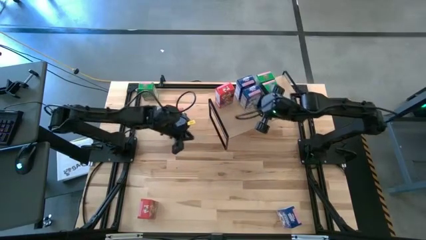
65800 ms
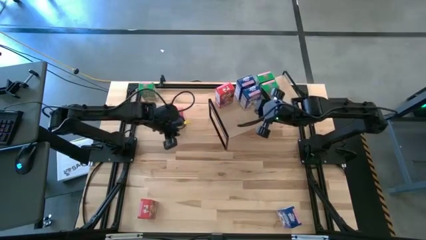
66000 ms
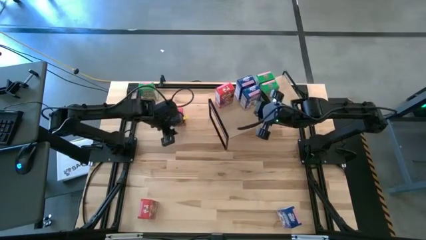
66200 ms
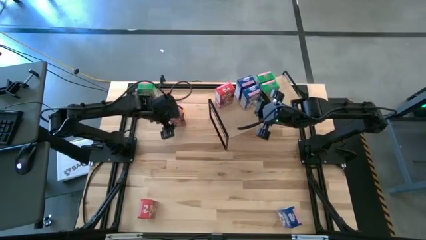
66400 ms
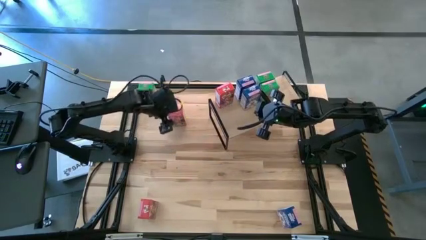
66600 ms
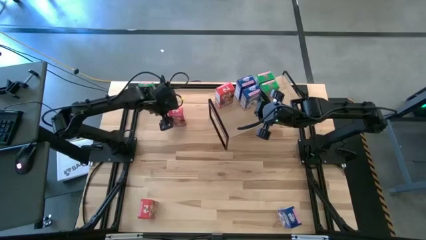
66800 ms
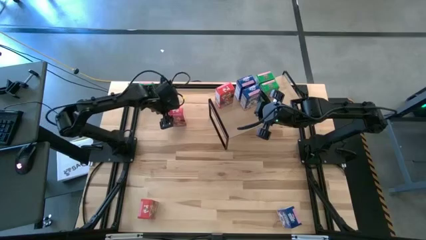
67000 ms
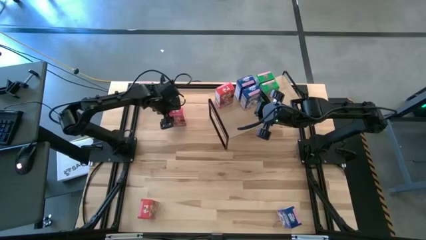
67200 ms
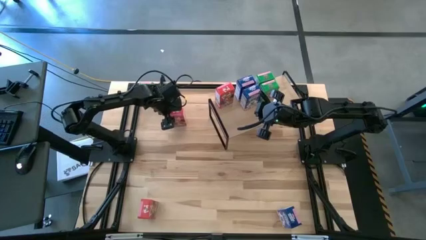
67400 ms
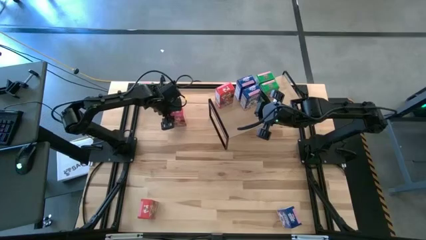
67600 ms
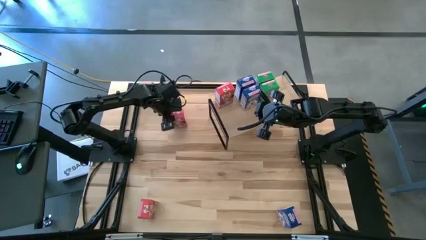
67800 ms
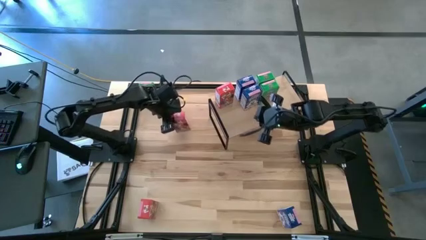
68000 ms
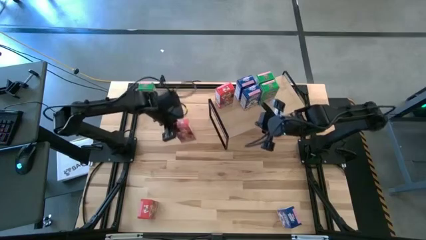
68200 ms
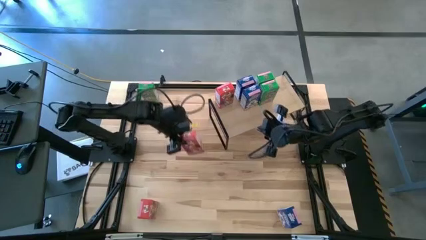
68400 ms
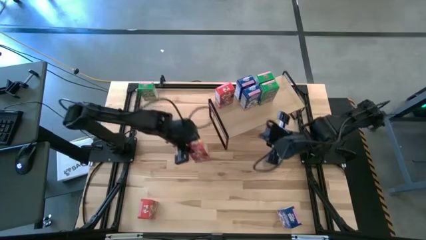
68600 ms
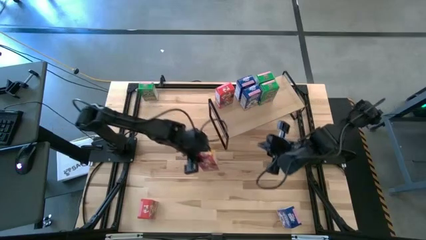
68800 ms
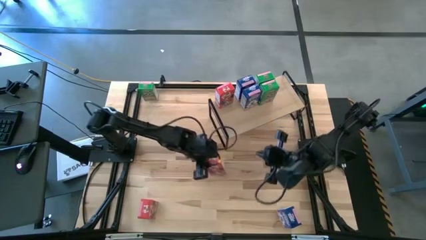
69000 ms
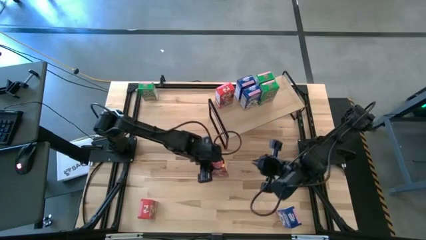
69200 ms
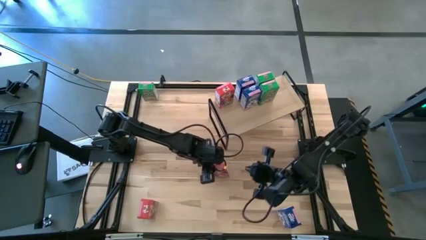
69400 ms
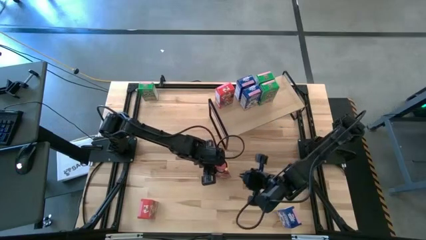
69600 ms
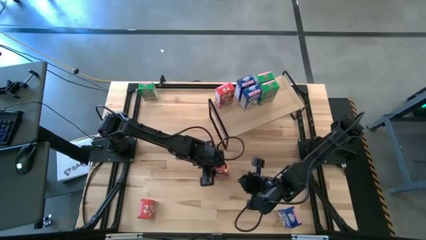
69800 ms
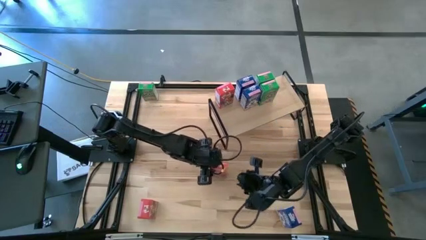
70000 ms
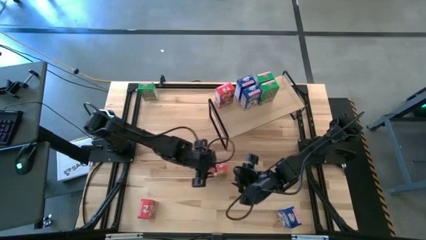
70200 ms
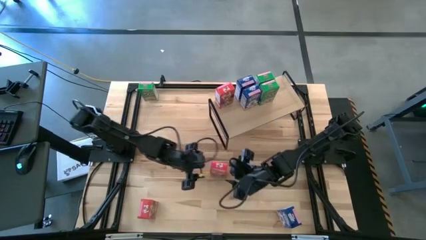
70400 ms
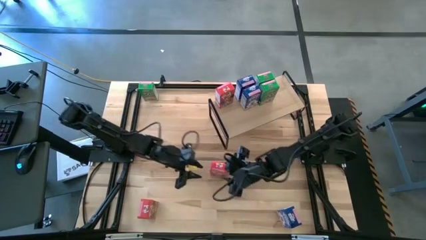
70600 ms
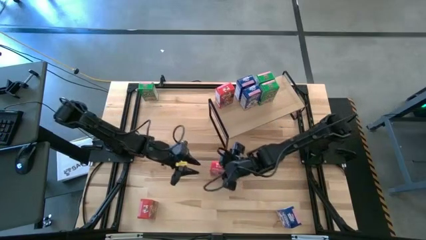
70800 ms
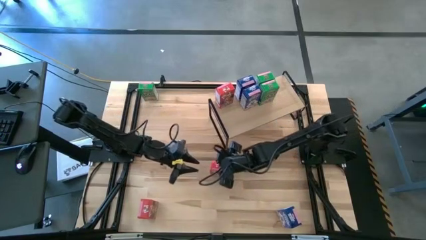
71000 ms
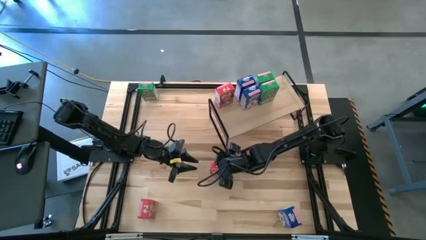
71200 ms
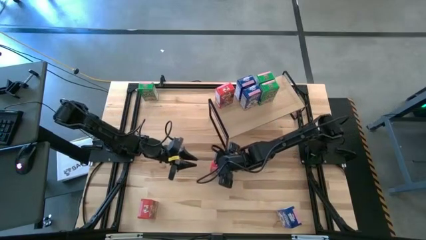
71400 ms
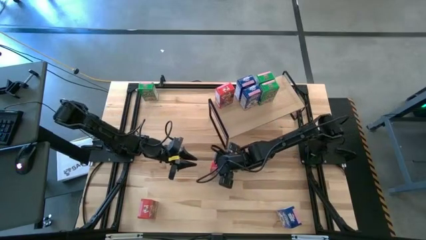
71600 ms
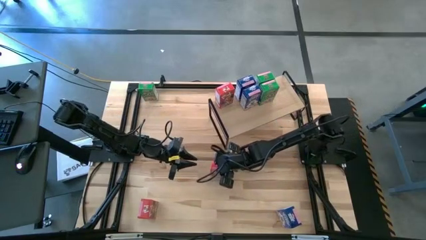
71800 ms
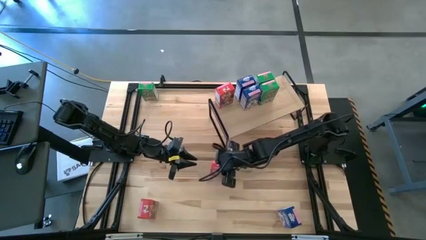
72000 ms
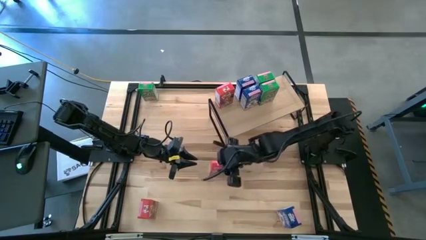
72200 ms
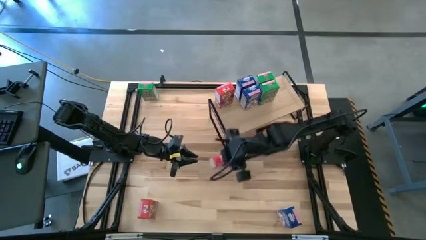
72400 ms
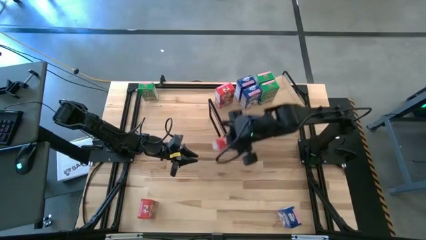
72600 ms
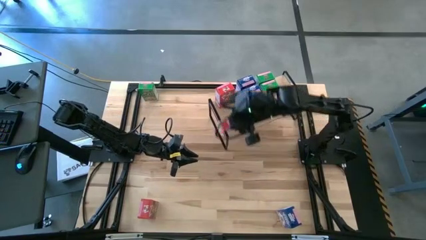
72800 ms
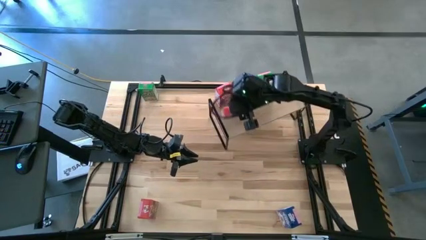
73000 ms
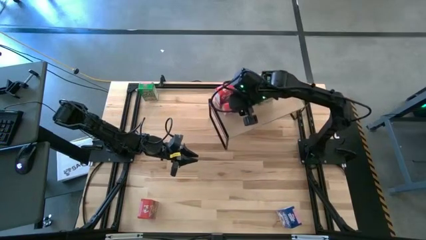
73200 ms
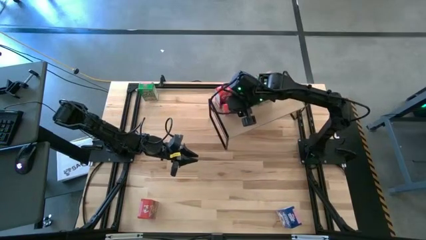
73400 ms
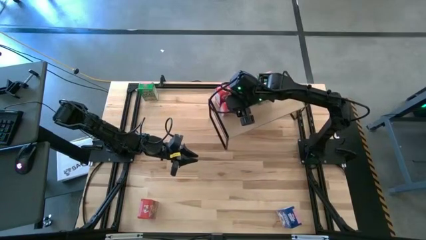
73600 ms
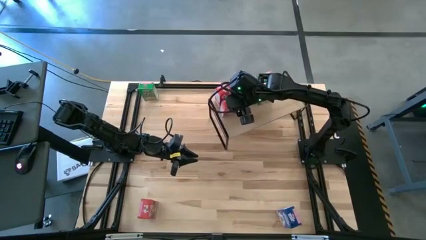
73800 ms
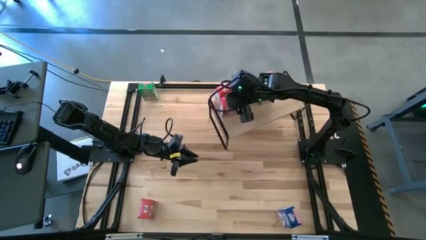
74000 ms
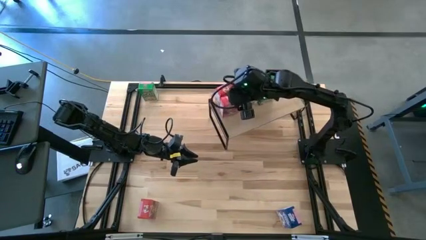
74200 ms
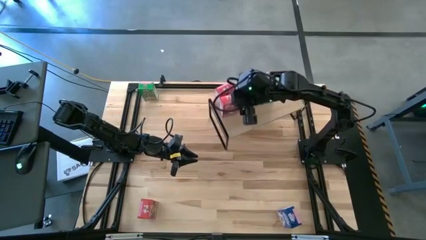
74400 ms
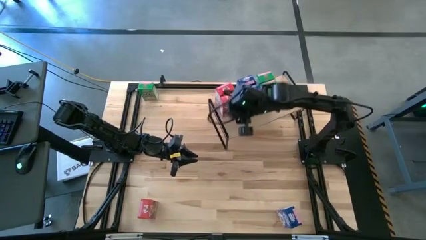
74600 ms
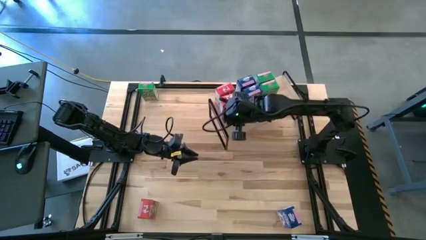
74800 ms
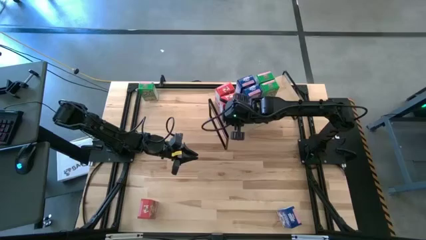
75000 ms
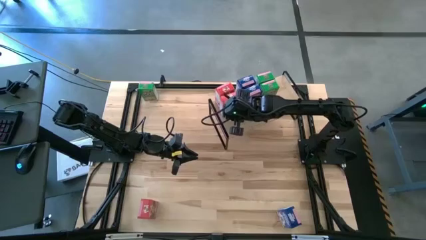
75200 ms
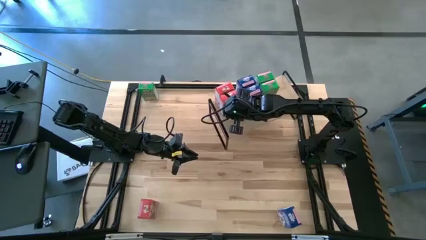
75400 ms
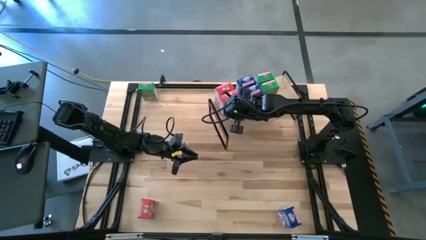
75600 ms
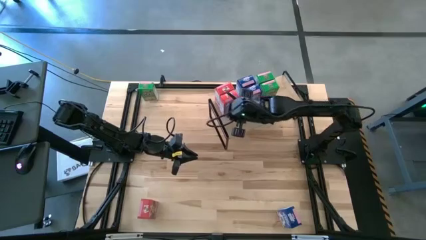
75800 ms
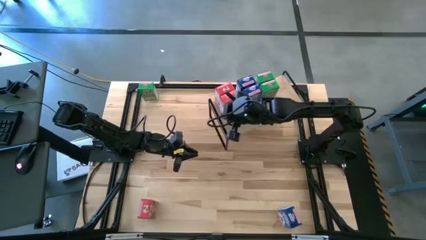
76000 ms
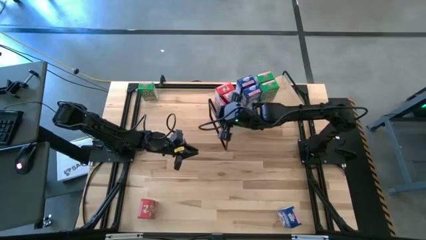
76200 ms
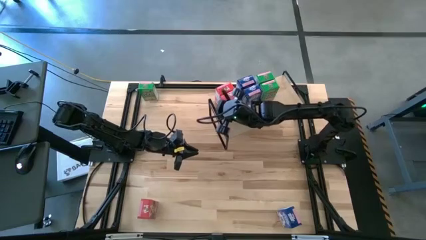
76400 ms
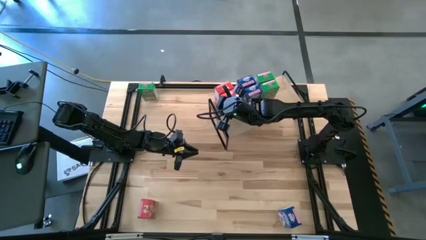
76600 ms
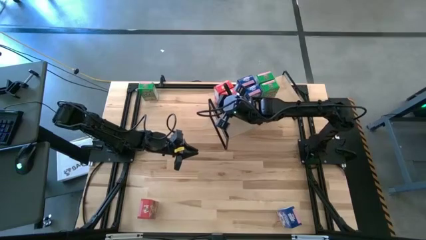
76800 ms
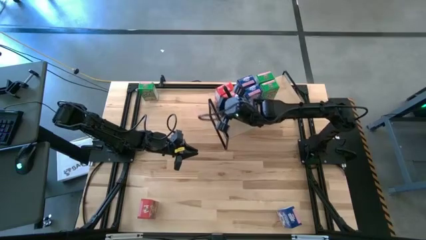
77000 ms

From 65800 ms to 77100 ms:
Task: Stack cereal on shelf
Put the top red cereal box on the shelf aligned with the red cereal box

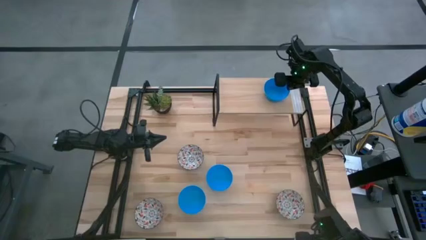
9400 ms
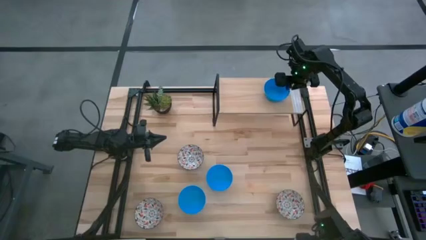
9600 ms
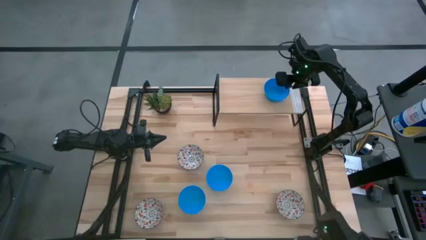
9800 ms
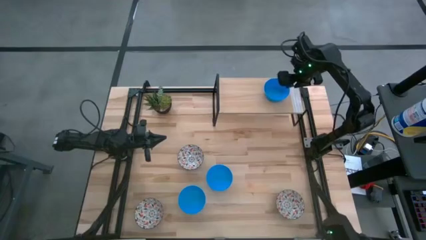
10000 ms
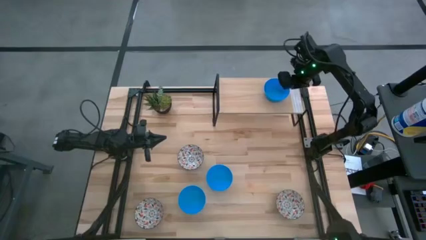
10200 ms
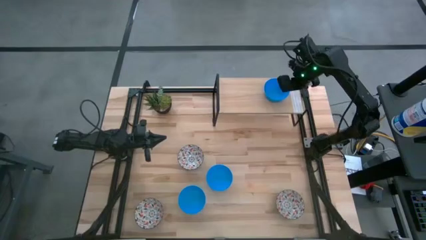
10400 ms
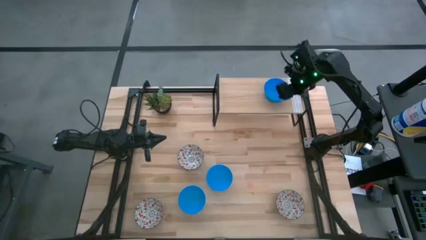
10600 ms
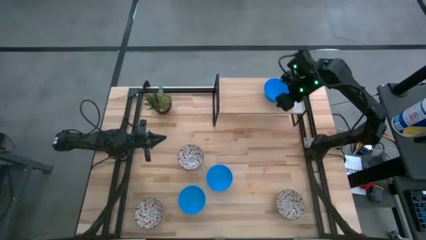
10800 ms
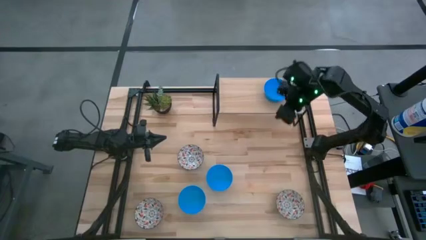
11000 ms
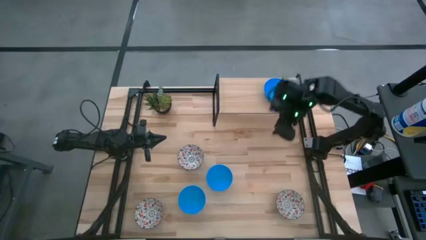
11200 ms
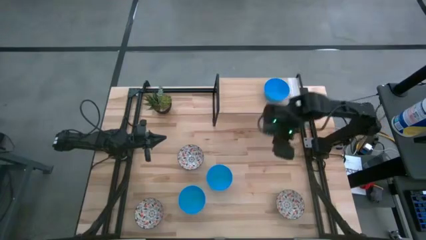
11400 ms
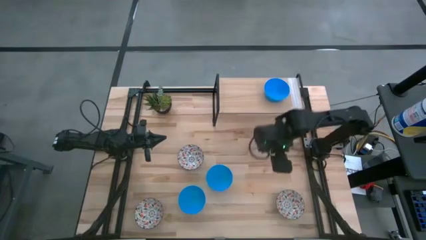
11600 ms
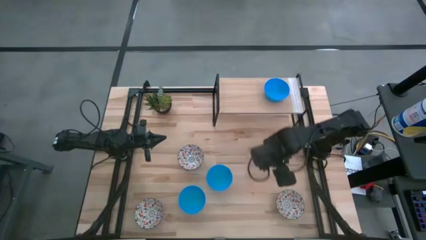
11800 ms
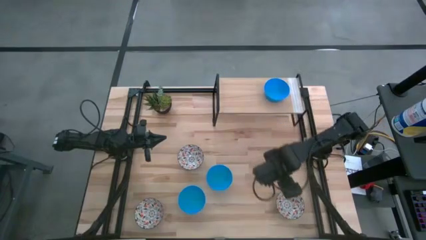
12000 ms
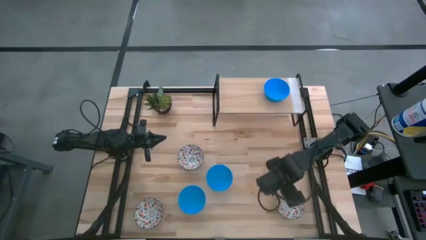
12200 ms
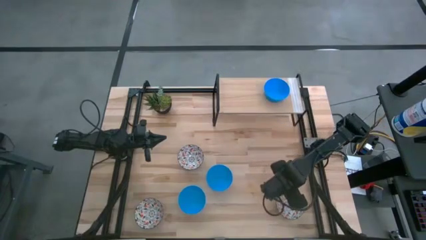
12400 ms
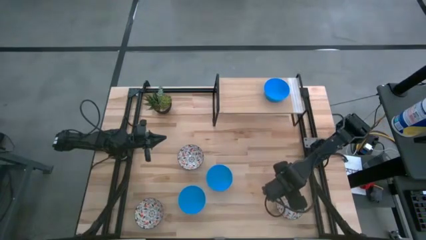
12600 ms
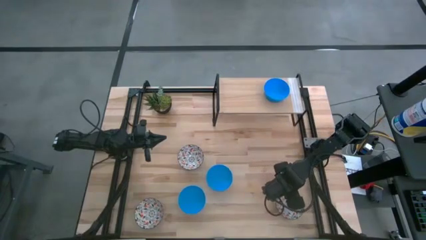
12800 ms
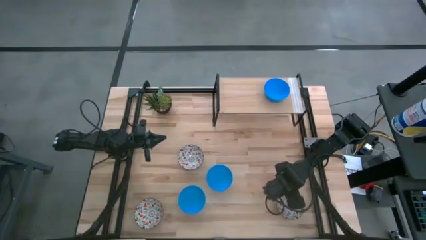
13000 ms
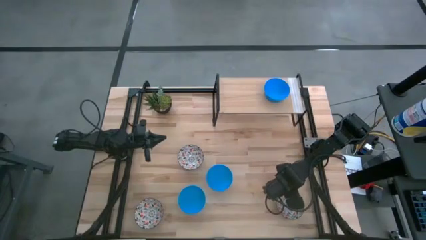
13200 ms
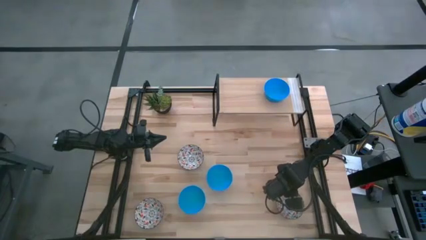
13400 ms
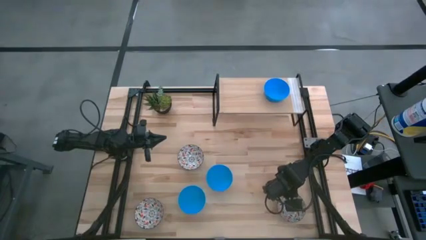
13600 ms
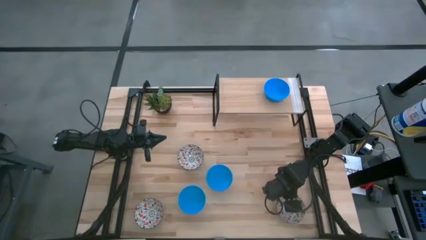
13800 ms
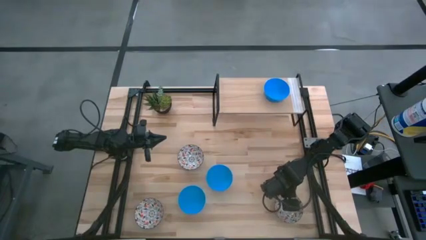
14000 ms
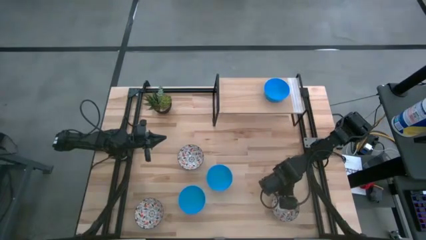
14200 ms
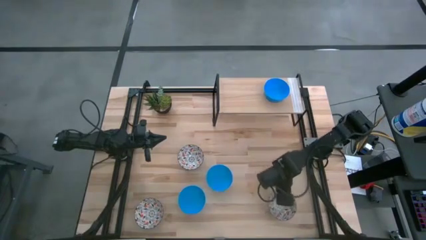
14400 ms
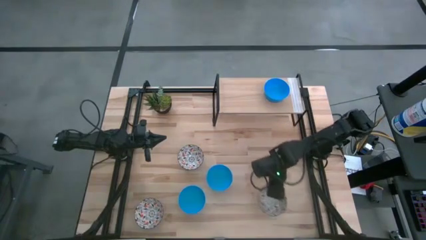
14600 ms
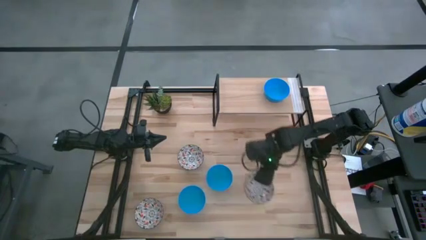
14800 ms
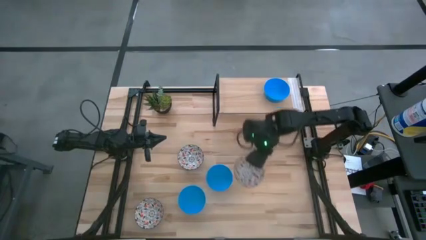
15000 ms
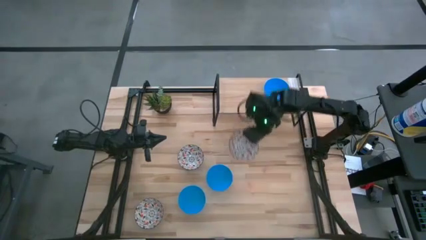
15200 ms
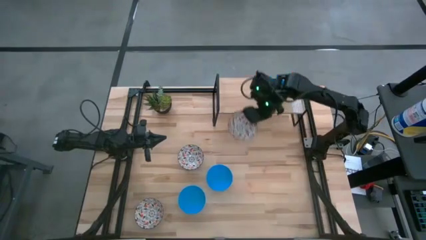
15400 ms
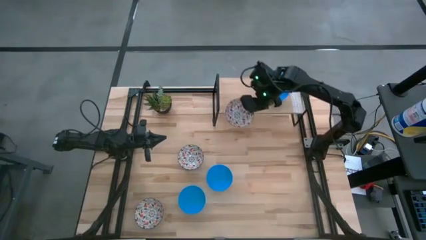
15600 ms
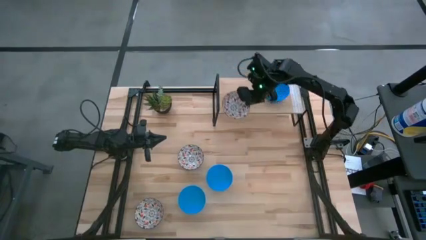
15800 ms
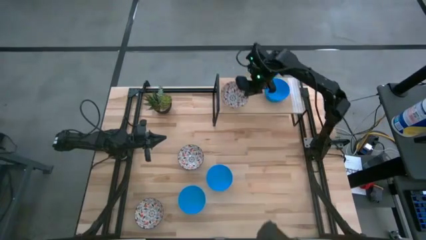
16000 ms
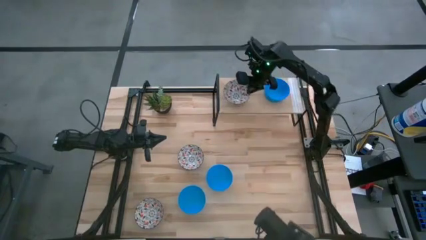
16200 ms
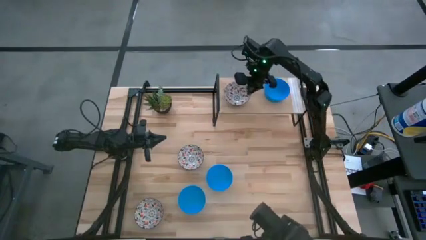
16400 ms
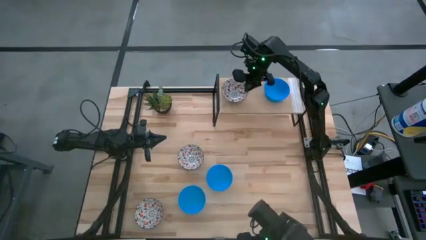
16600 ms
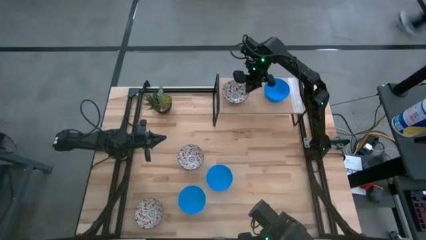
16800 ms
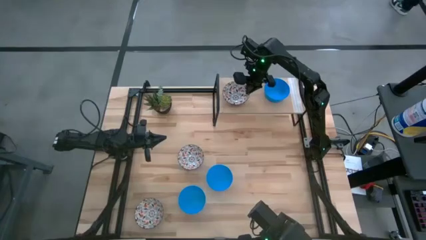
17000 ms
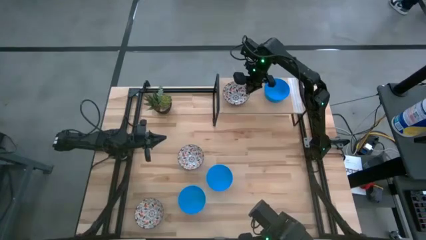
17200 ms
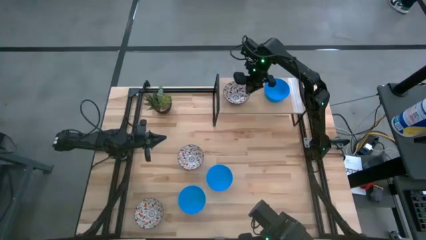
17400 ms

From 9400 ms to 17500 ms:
Task: Pick & Place Mini bowls
Put the bottom right white patterned bowl on the shelf
